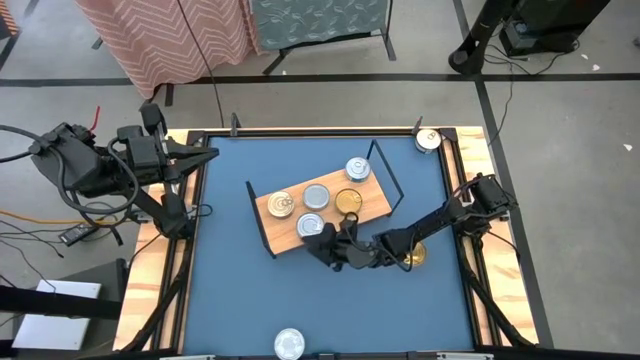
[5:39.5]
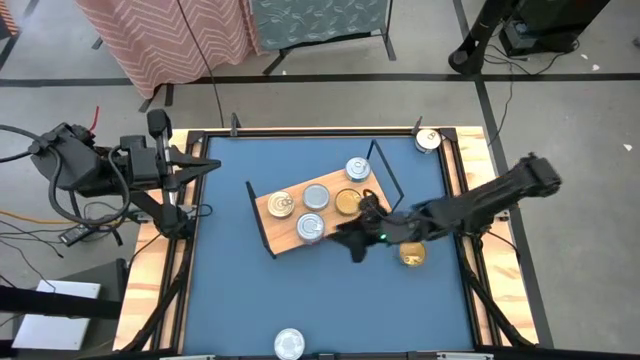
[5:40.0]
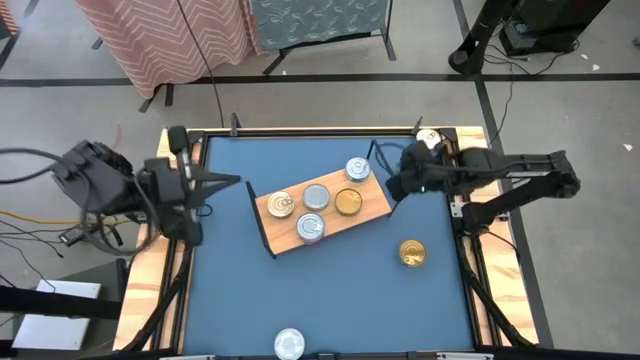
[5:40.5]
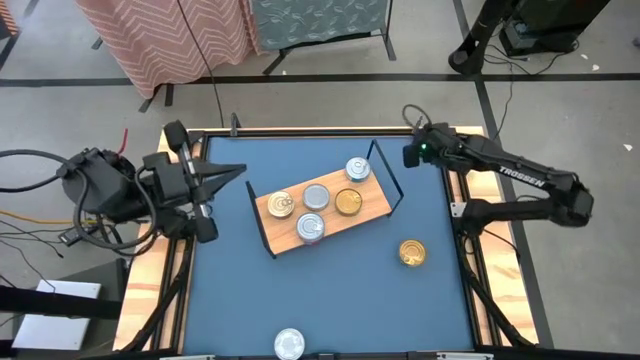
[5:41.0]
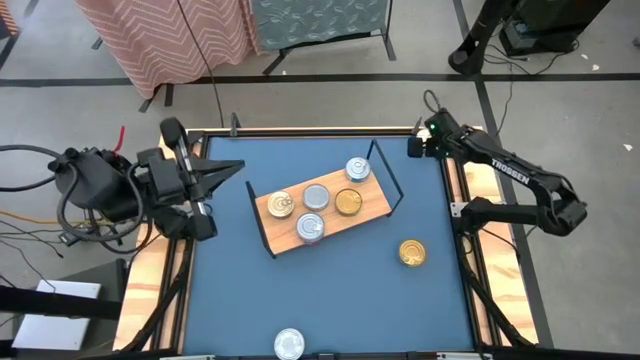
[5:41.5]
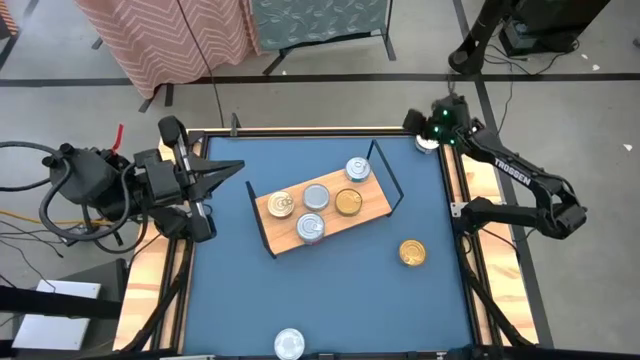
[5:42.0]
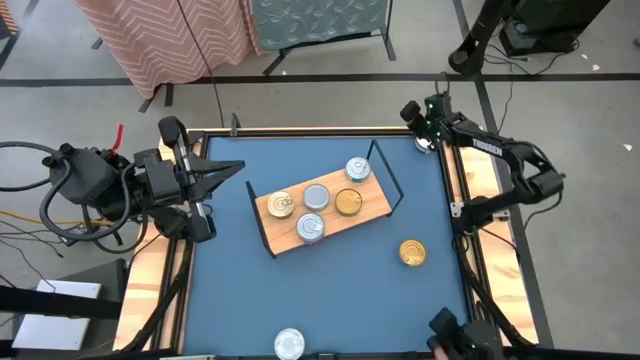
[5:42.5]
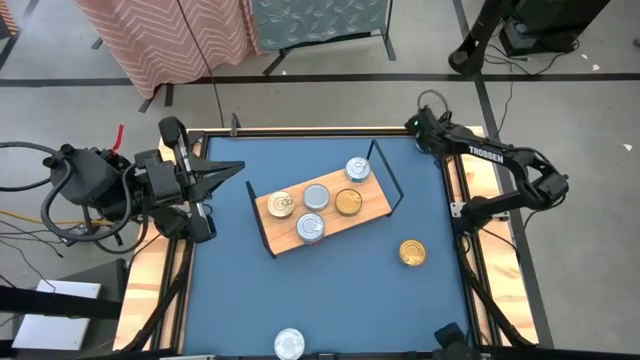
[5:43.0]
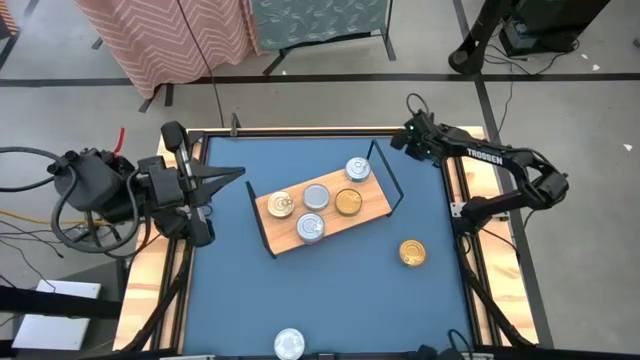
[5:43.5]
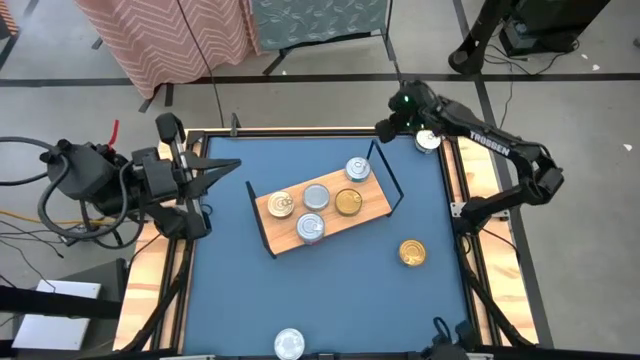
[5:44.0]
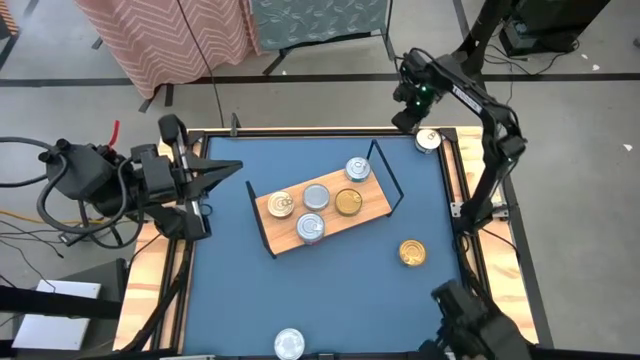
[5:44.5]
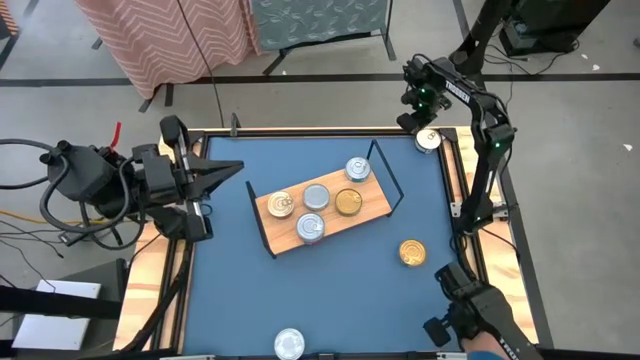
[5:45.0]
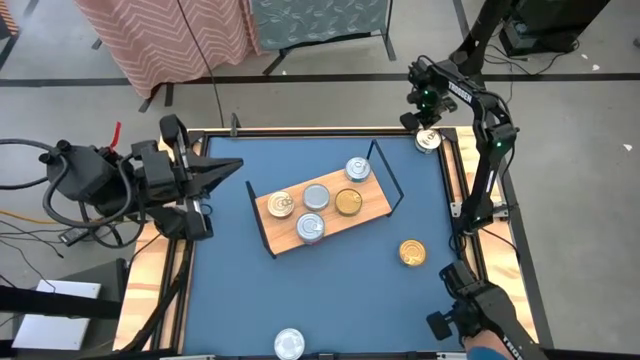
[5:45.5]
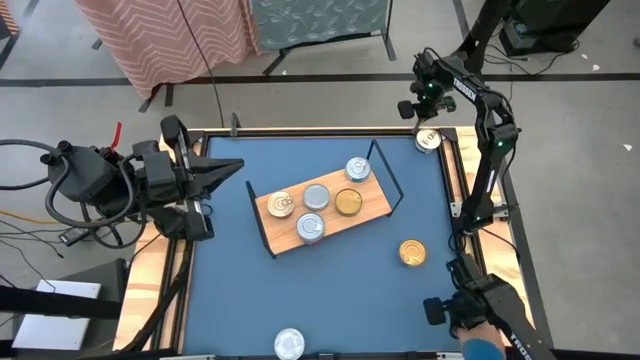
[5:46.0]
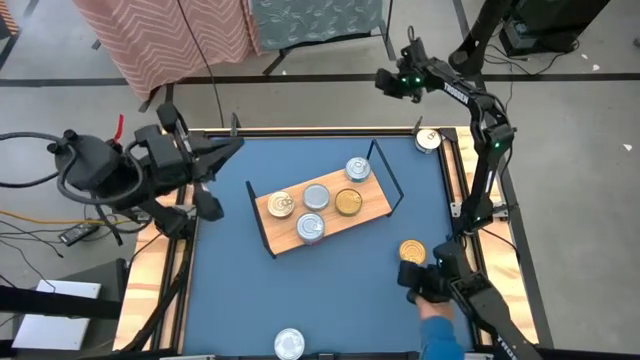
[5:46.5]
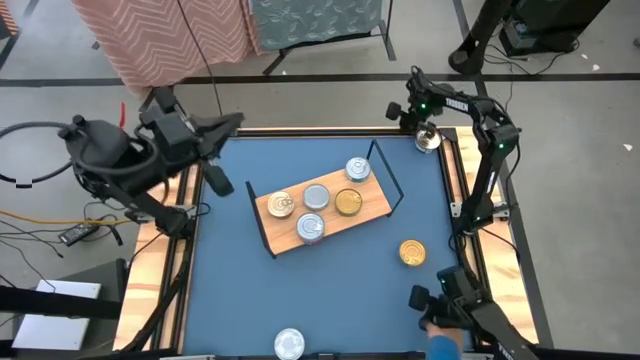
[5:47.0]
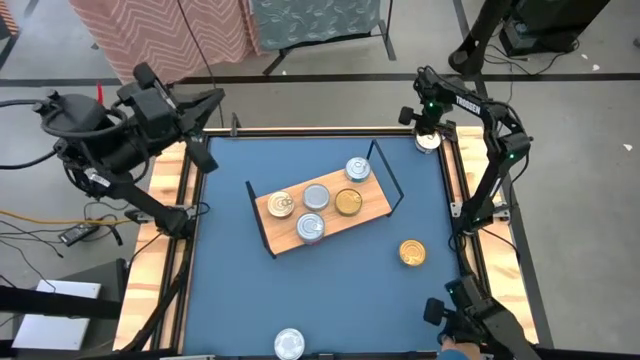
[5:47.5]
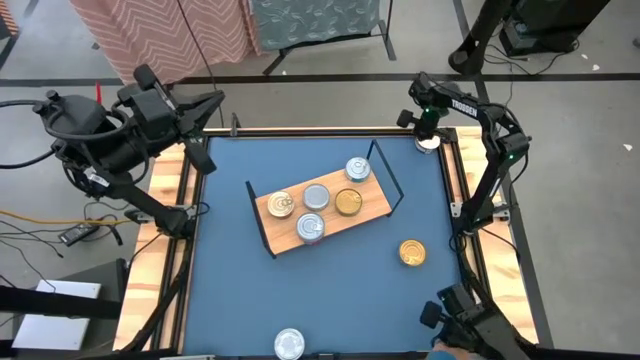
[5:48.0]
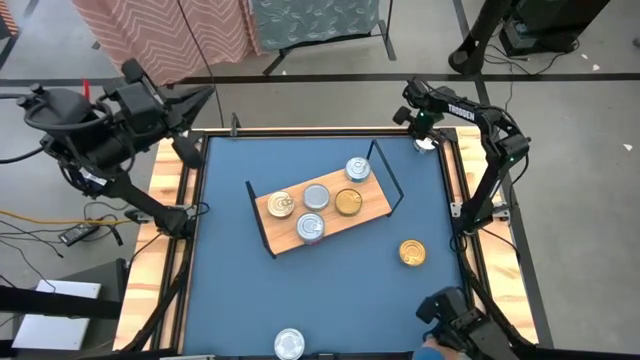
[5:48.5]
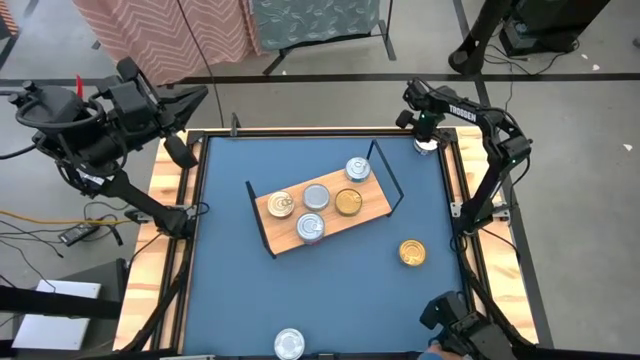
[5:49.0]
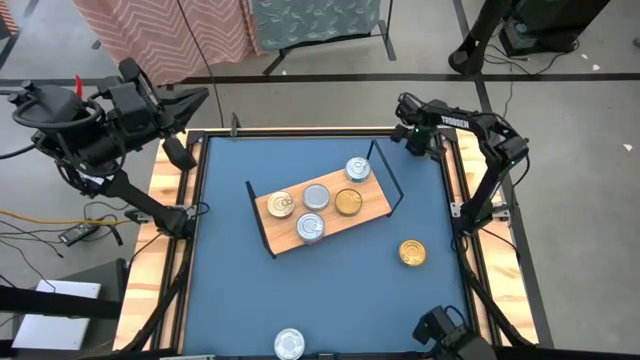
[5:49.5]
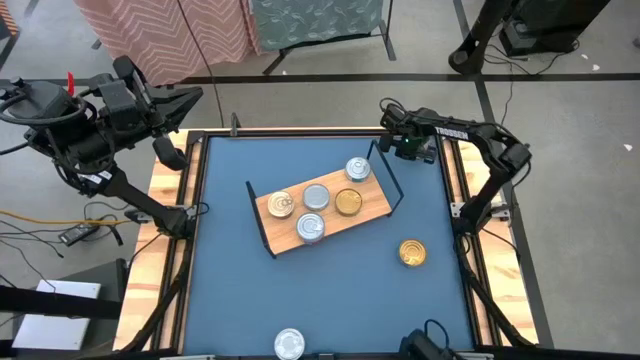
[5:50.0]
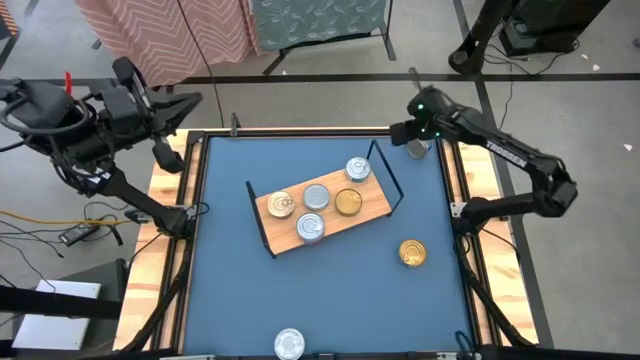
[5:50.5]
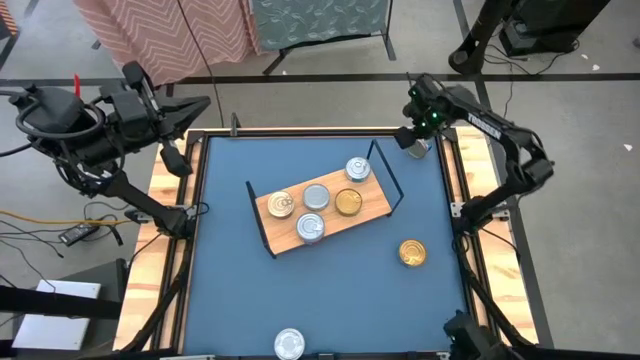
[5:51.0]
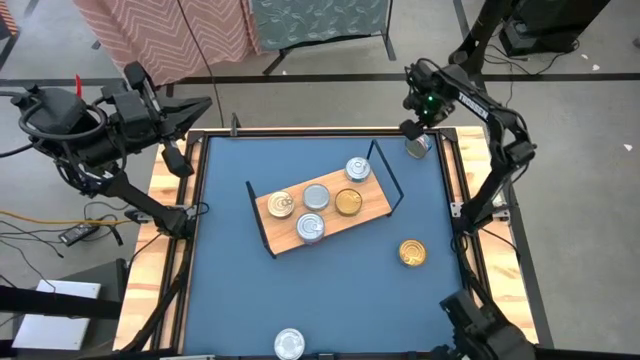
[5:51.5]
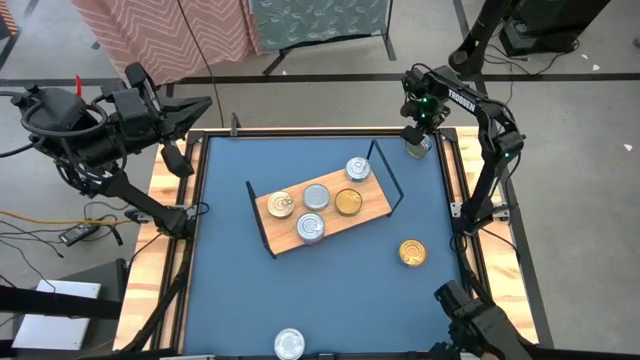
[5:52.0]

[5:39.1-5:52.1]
Task: Stack canned seafood by type on shelf
Put the blue/pink tuna can on the shelf

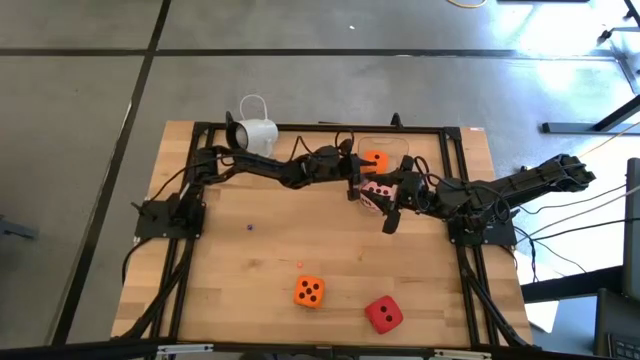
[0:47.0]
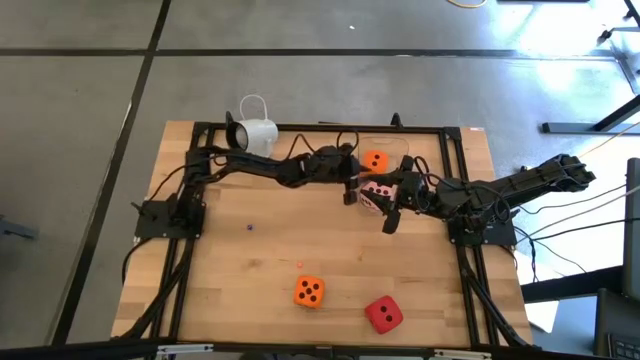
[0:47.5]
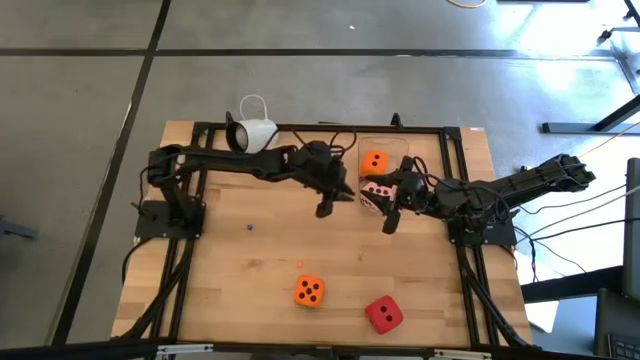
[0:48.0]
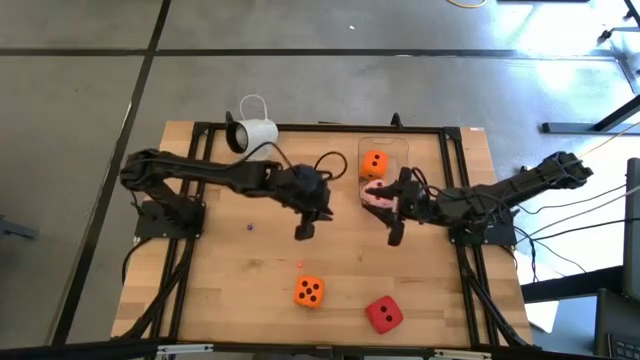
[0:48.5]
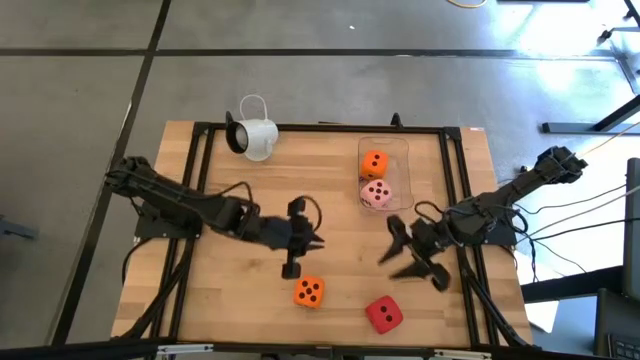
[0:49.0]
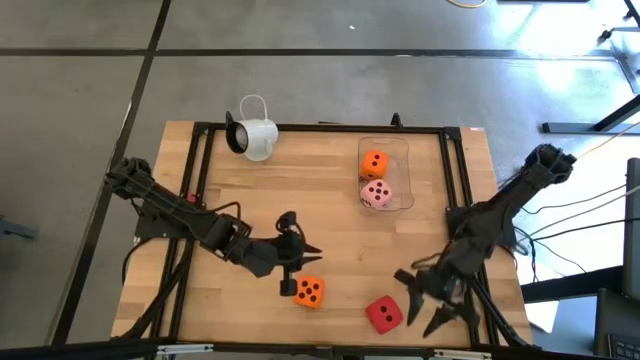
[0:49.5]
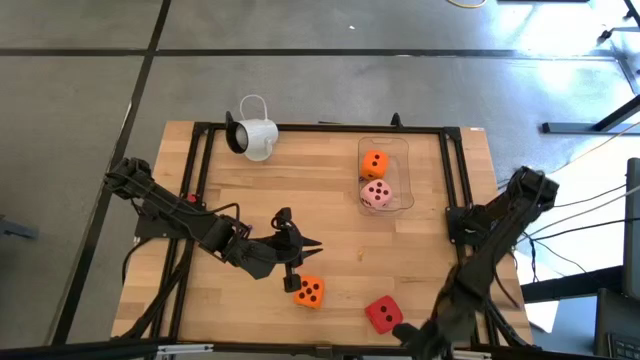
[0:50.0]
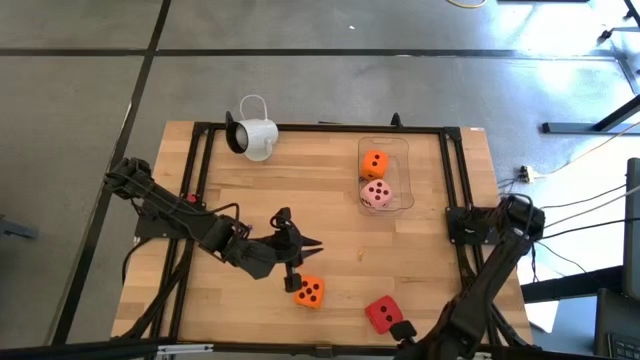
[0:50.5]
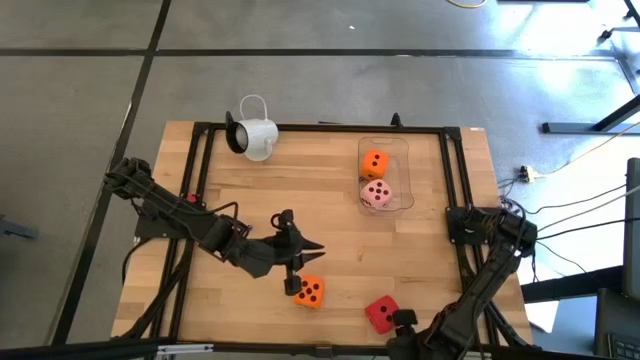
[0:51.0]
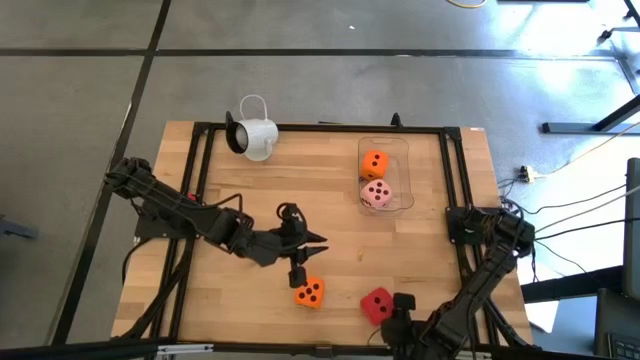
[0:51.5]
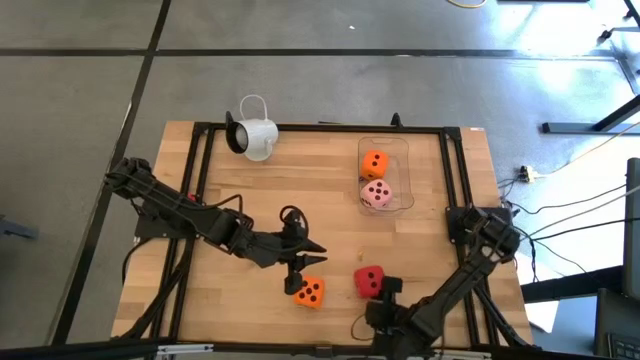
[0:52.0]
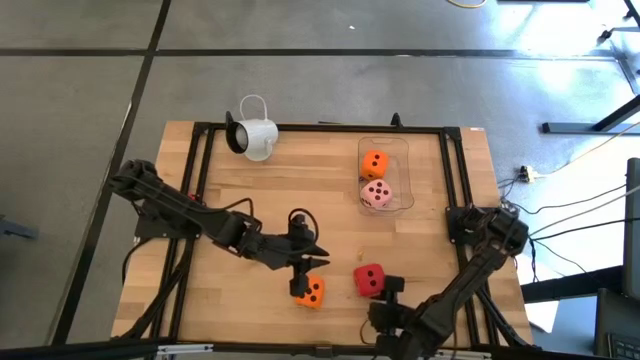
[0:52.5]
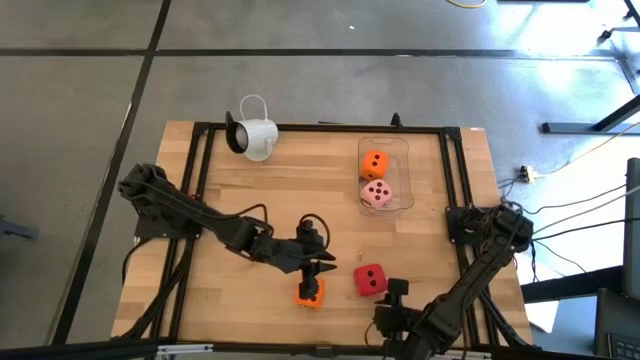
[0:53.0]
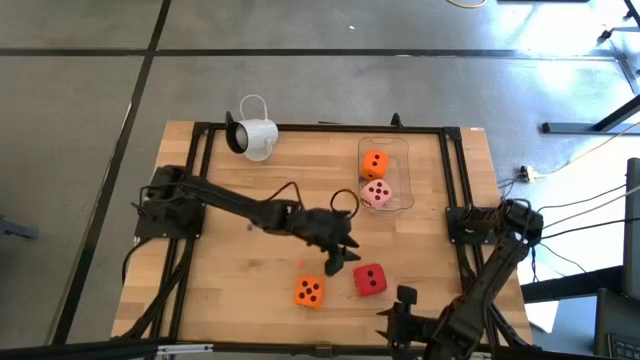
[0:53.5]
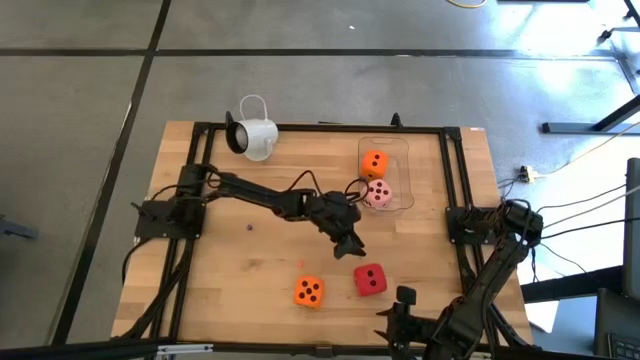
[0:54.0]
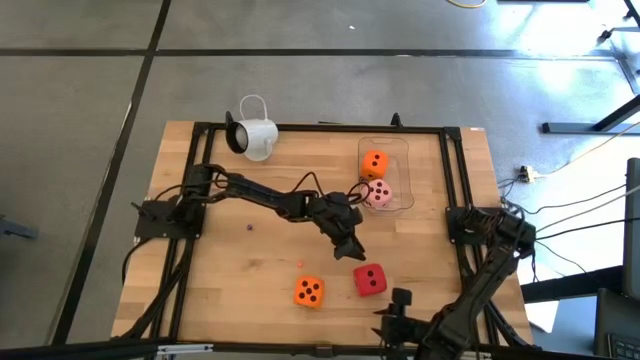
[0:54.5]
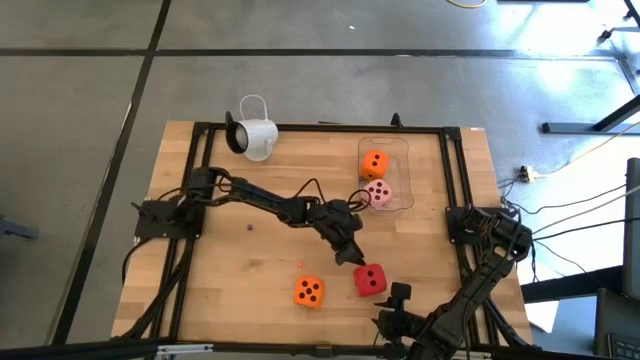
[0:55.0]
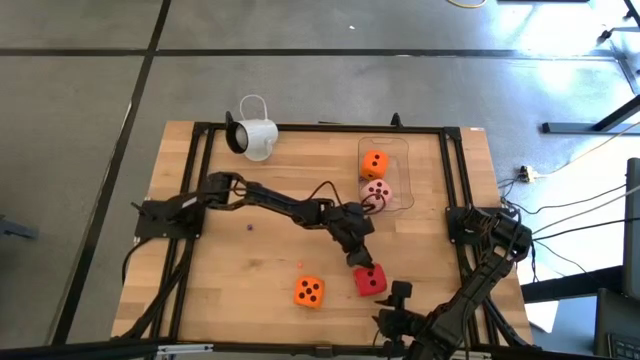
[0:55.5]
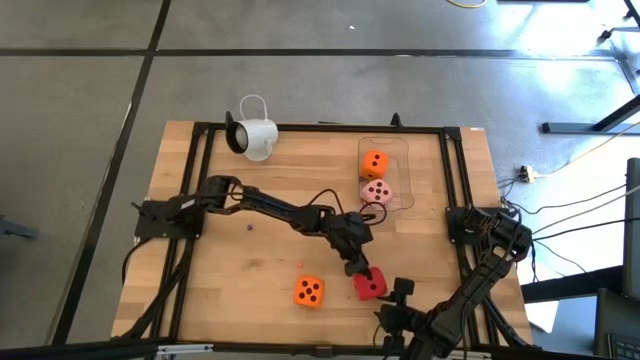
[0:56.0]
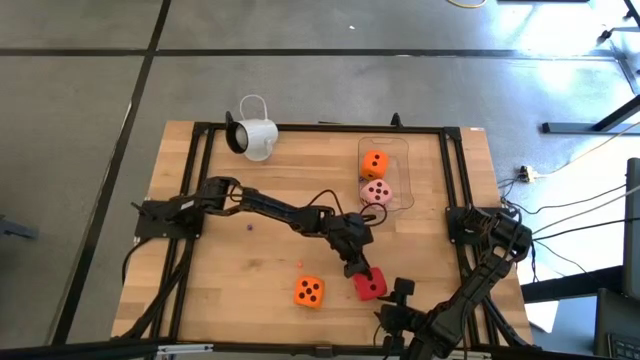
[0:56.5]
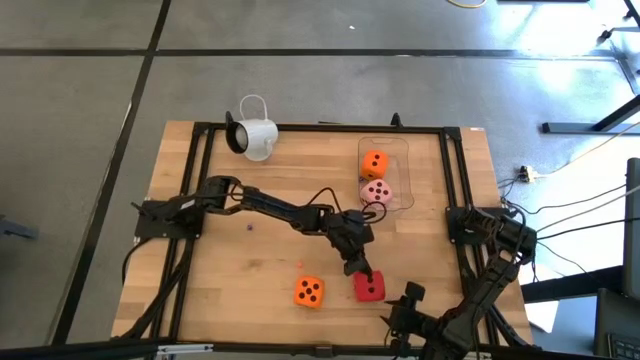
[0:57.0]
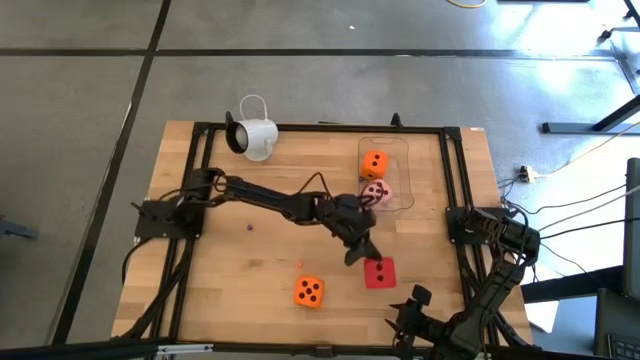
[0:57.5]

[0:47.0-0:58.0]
Task: Pick & Place Dice
Put the large red die into the transparent bin
